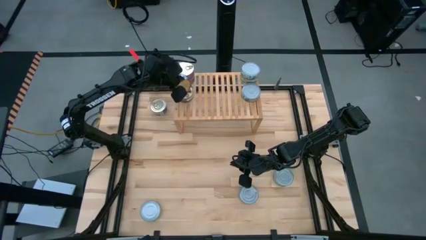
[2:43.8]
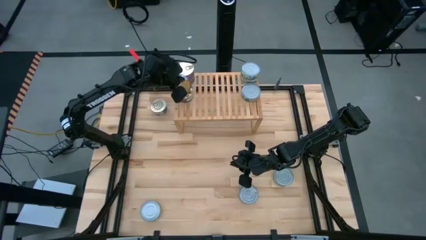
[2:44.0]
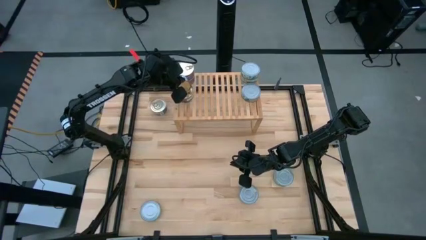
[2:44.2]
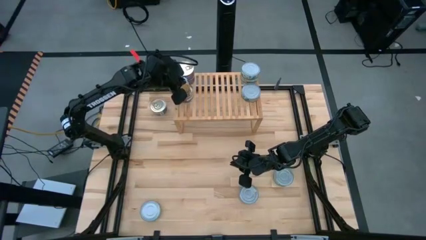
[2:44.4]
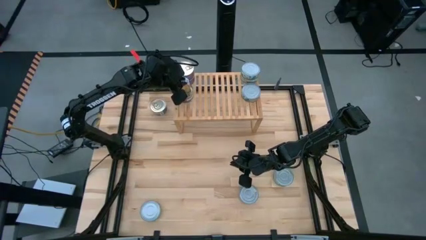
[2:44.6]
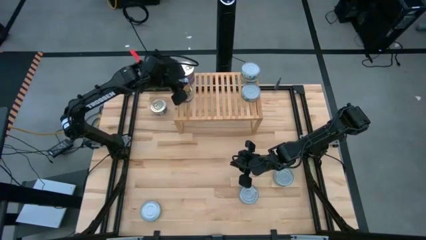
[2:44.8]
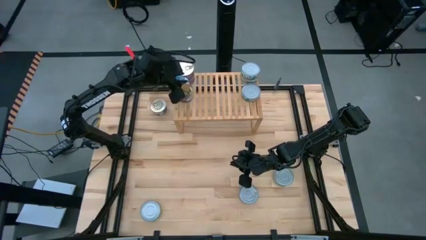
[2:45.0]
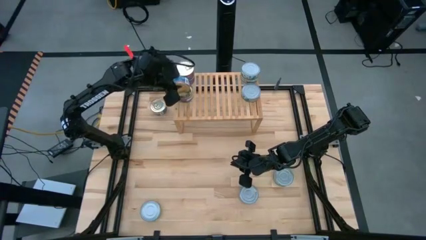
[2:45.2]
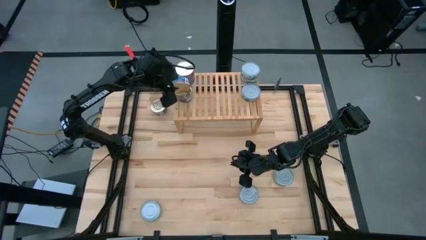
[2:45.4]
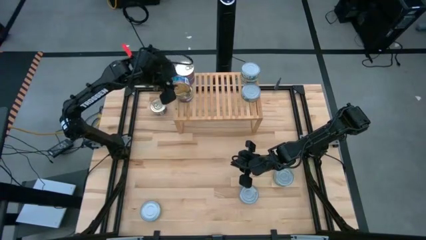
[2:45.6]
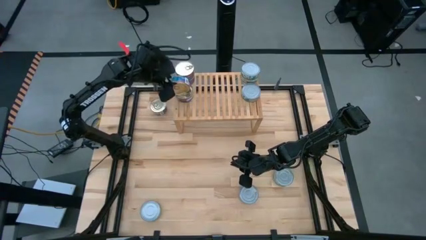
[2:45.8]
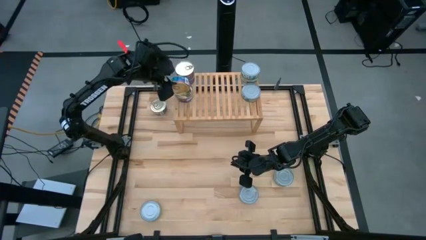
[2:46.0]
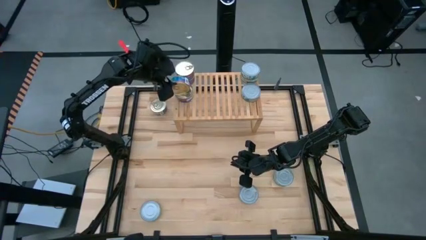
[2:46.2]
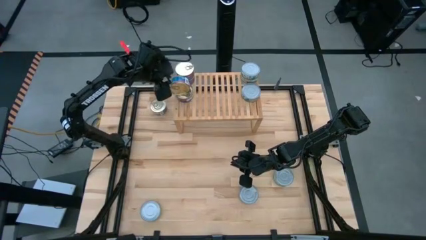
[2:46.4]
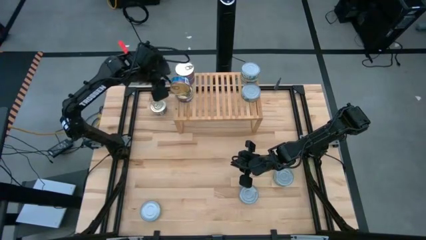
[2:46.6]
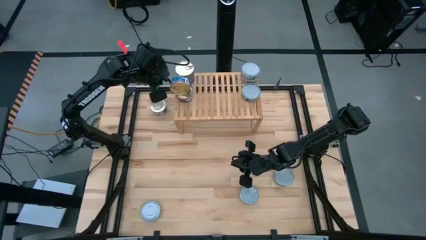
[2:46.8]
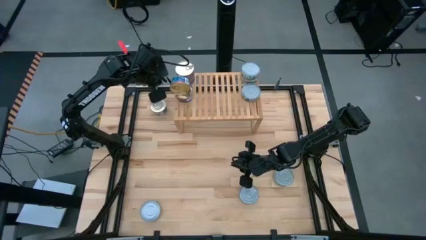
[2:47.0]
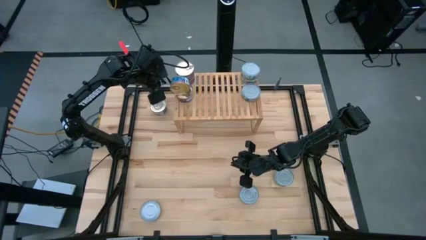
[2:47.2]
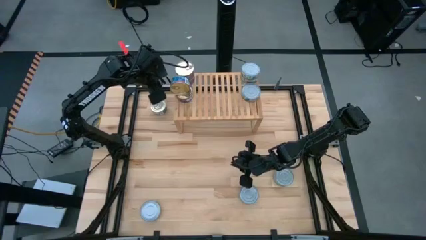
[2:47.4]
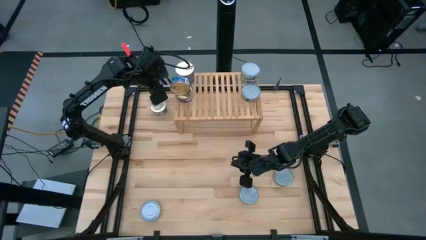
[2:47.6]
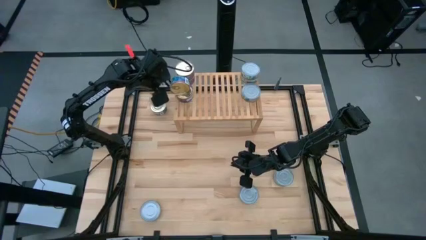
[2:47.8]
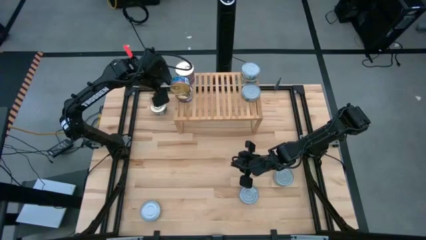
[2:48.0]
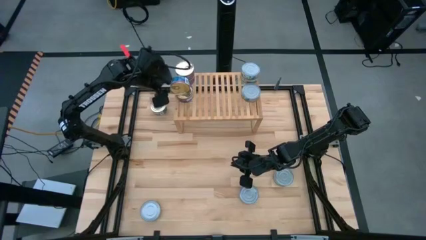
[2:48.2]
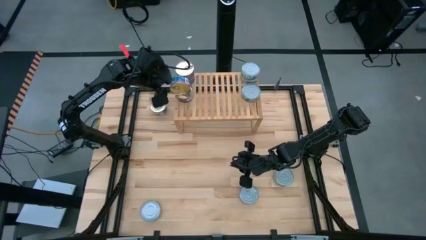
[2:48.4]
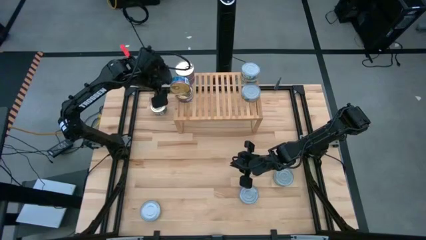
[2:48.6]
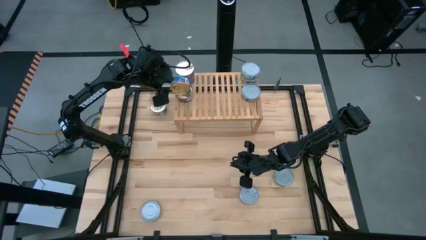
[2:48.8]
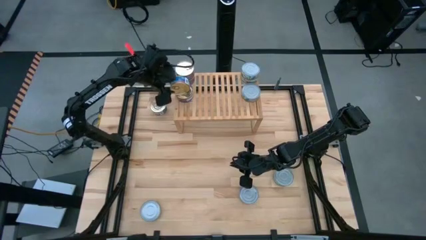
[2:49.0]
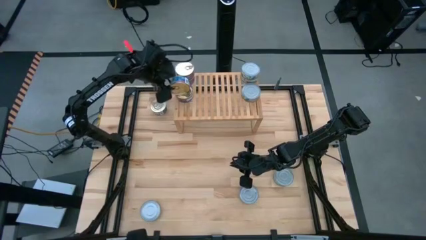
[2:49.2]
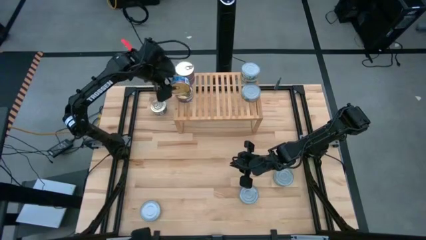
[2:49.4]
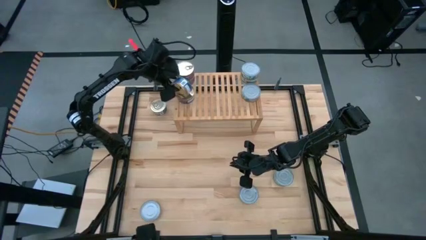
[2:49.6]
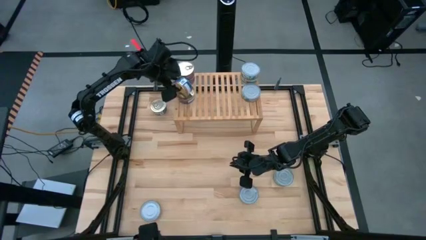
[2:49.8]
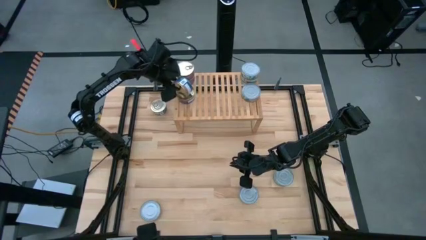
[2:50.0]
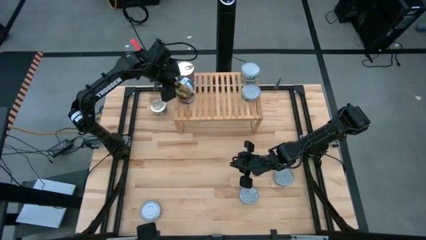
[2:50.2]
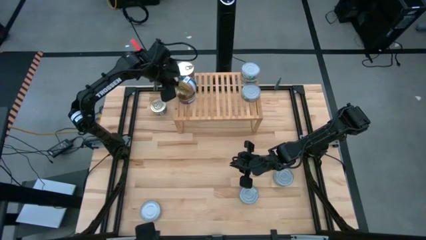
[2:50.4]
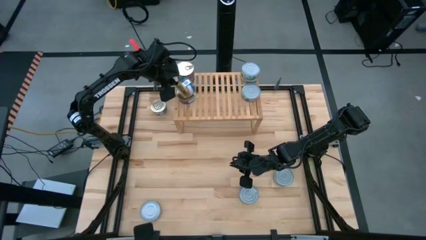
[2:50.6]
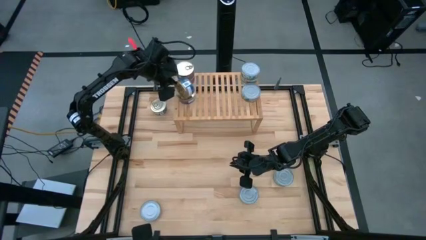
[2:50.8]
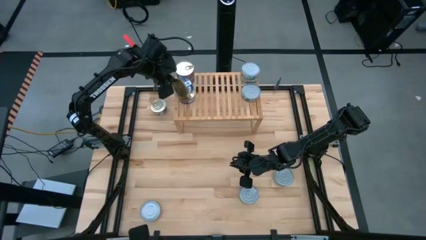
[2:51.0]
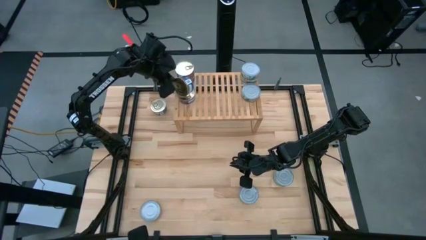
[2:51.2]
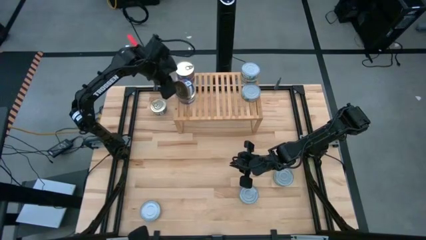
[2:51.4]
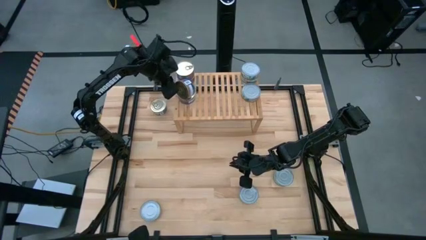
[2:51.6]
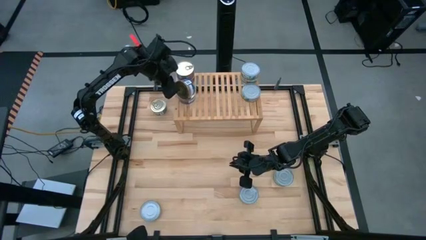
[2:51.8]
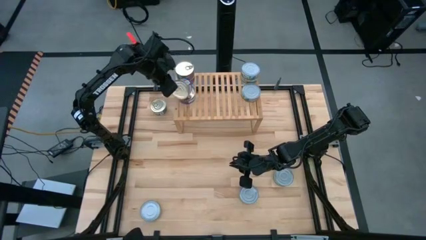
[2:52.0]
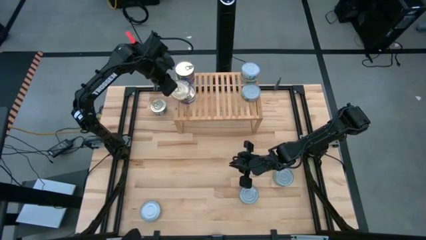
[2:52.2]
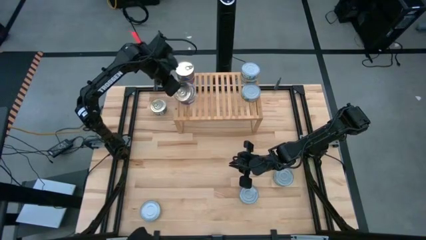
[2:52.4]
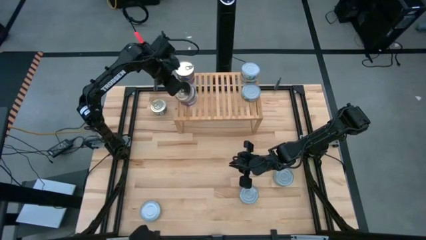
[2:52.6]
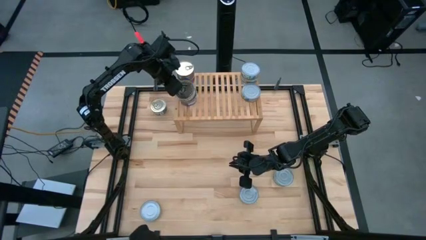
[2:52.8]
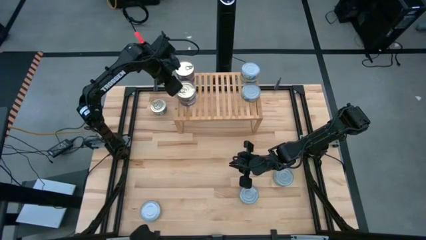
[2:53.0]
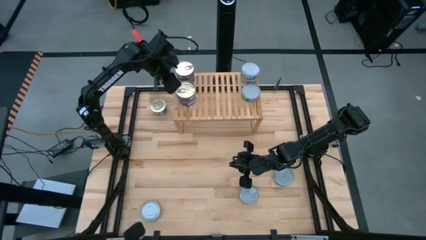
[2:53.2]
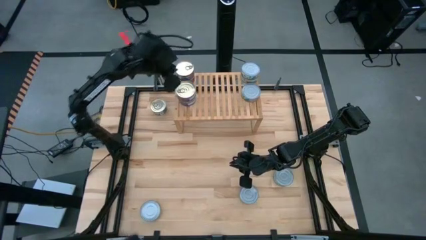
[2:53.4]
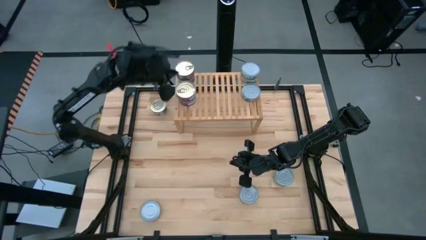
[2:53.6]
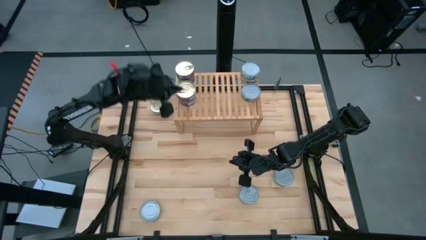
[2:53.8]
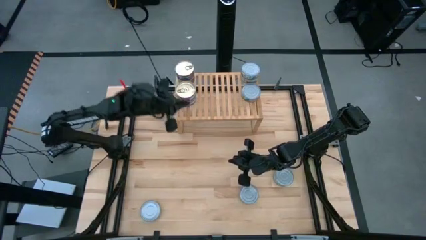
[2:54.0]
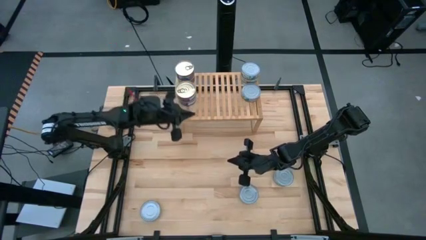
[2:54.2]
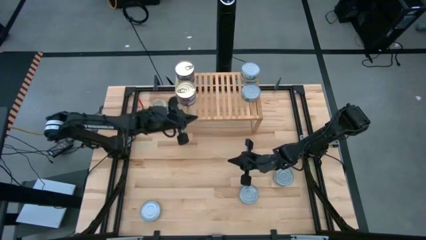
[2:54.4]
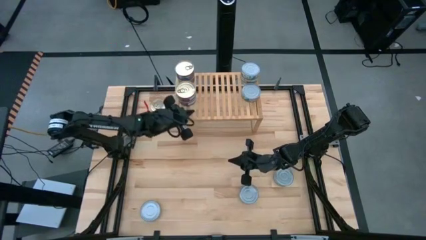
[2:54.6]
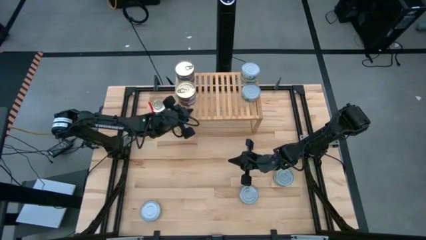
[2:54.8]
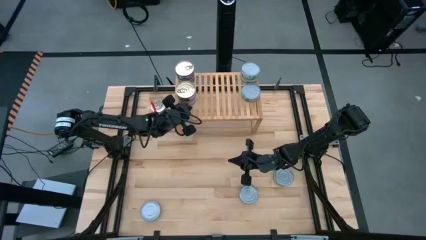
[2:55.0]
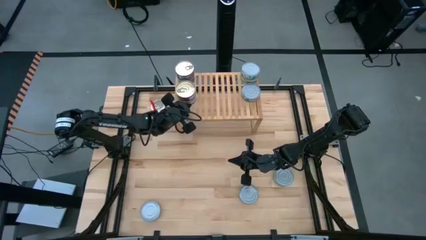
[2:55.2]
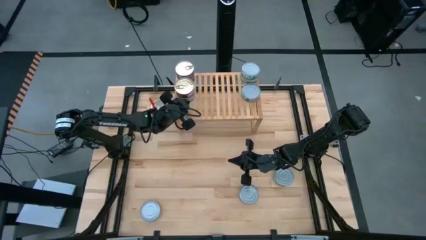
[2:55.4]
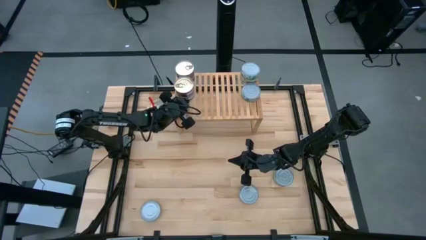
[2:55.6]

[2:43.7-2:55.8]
Task: Stack canned seafood by type on shelf
Stack the blue-pink tuna can on top of the other blue tuna can on the shelf

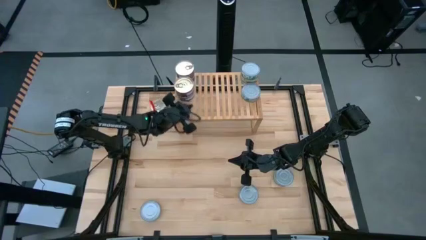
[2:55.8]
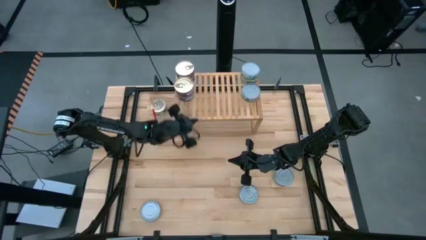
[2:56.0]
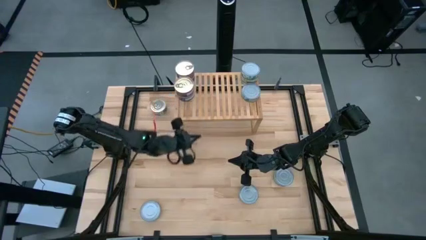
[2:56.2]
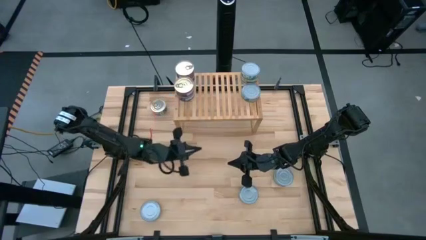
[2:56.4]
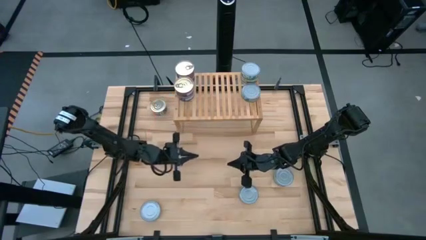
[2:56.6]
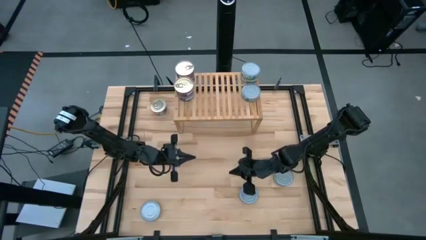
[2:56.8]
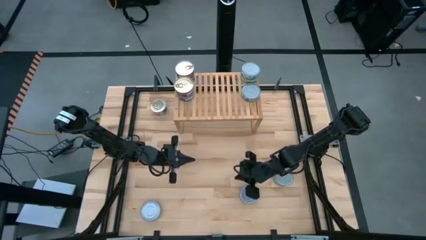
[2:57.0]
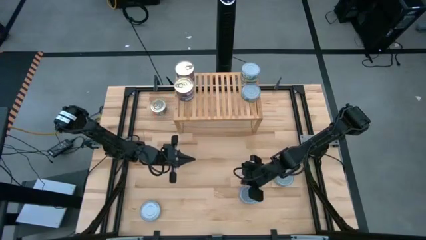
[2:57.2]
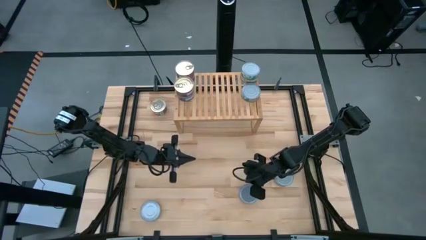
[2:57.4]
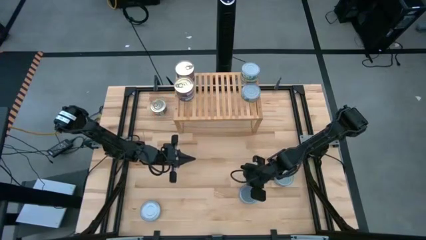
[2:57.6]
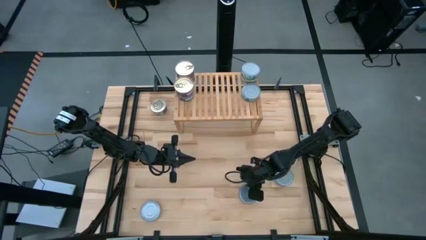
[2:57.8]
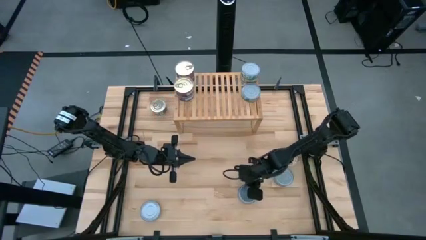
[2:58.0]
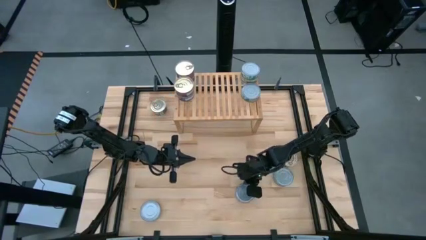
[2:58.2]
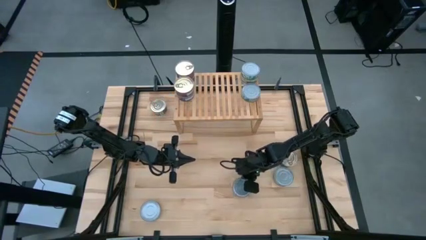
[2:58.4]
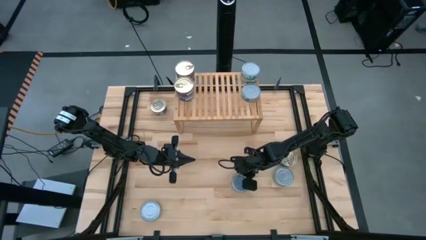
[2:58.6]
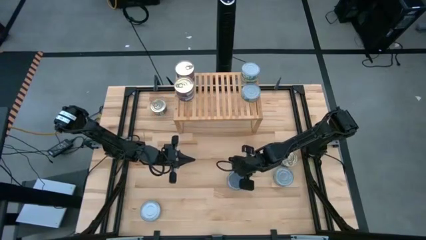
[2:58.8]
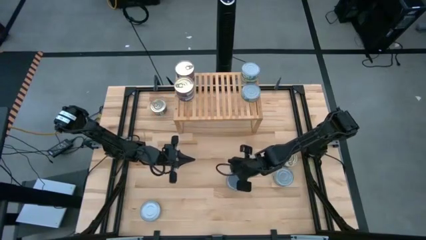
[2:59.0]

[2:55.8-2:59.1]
Stack the green tuna can on top of the other green tuna can on the shelf

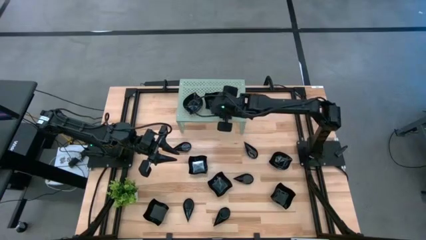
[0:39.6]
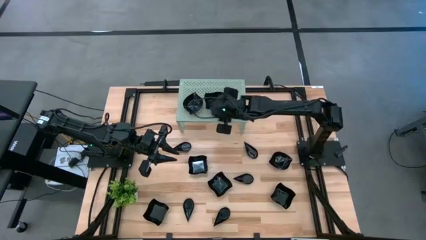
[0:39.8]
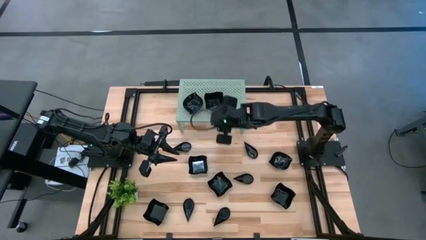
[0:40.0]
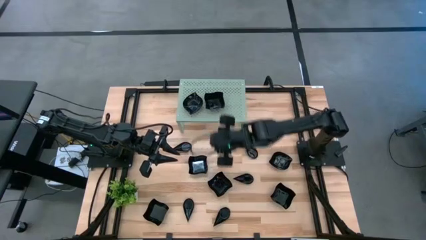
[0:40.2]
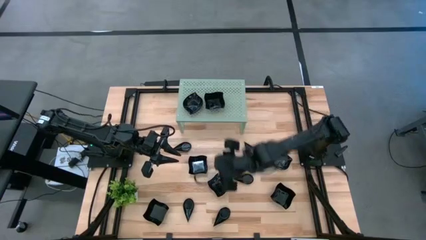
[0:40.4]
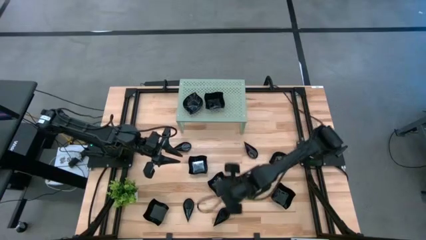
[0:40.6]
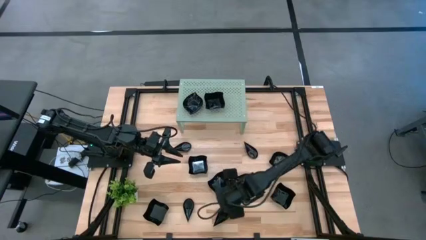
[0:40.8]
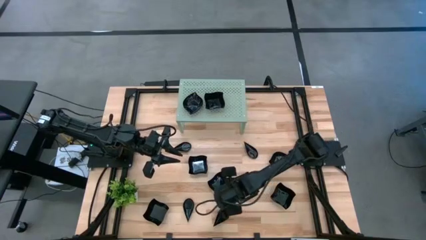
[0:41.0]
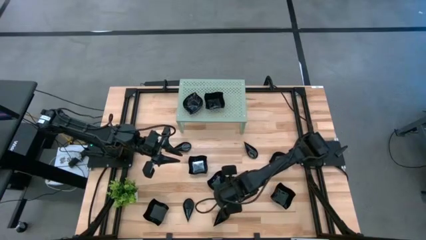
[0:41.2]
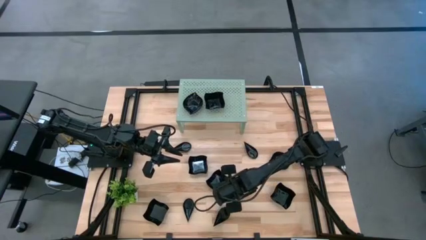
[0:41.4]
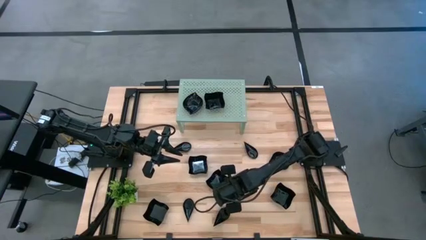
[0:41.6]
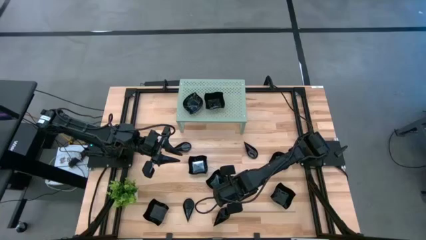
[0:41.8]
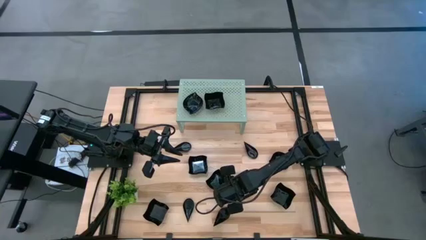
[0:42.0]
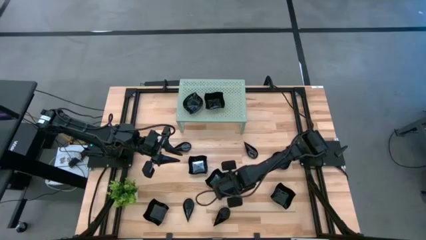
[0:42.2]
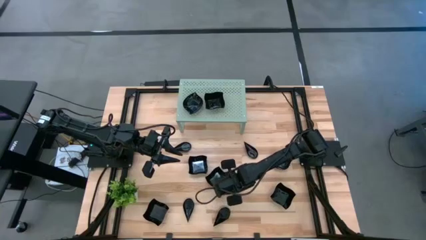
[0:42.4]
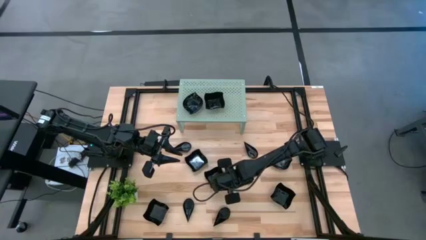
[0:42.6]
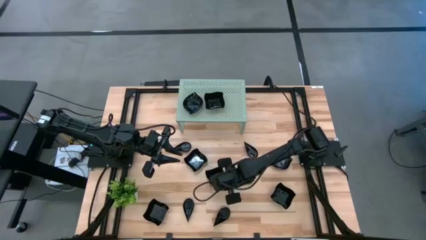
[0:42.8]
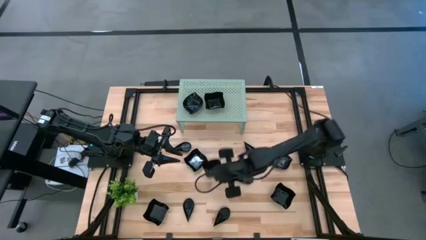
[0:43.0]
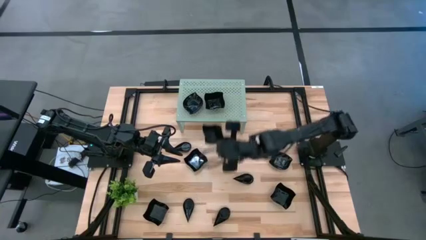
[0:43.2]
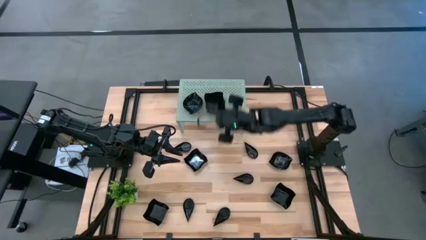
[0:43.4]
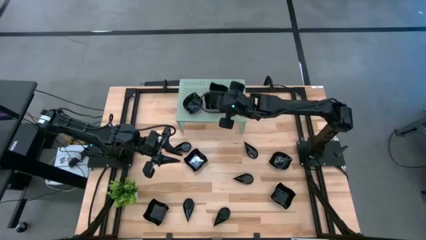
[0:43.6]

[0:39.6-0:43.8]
Task: Pick & Place Mini shaped plates
Stack the distorted square plate on top of the other distorted square plate on the shelf
